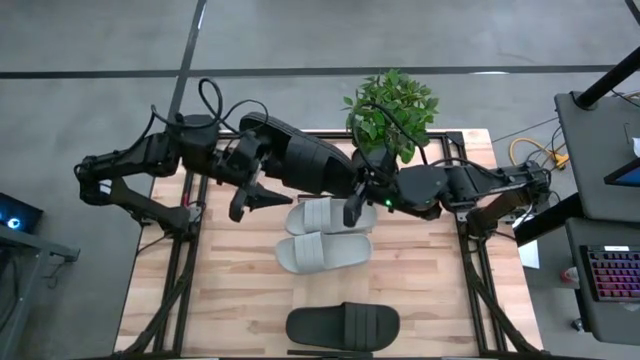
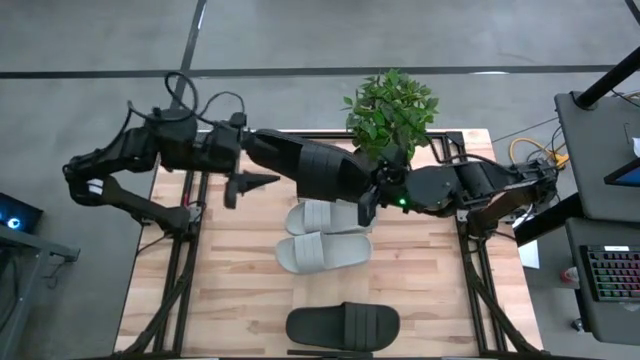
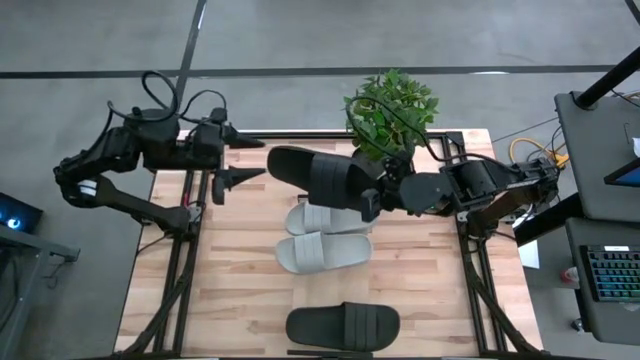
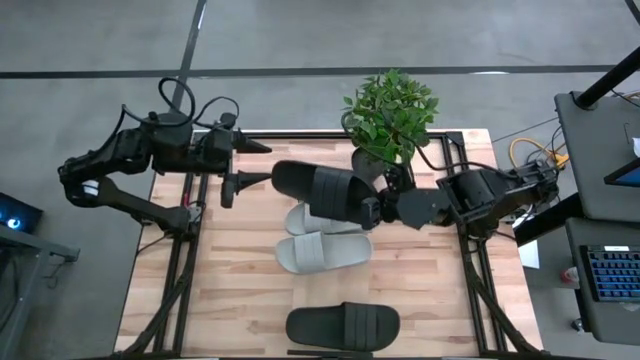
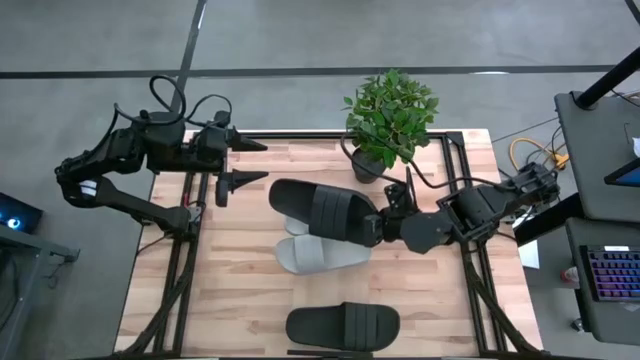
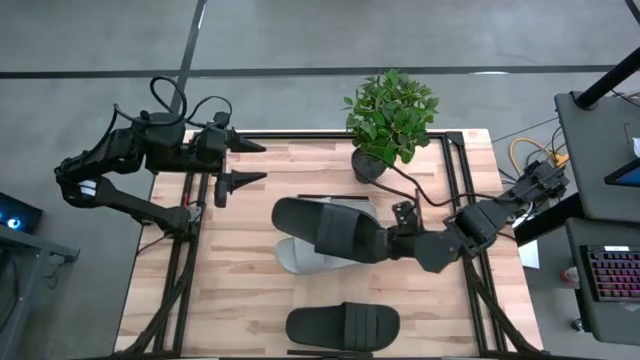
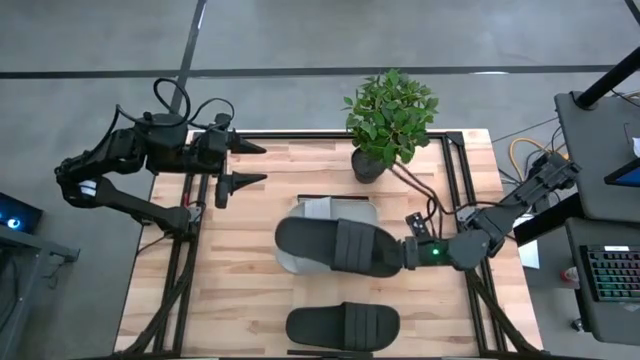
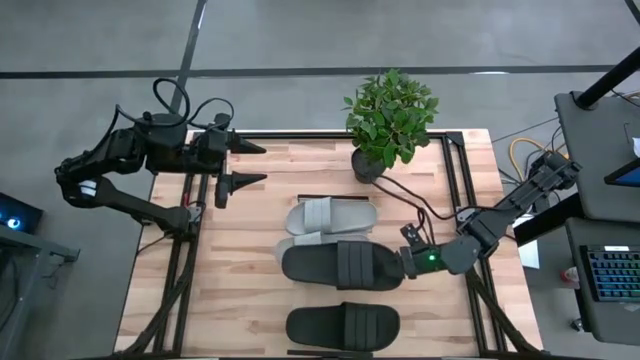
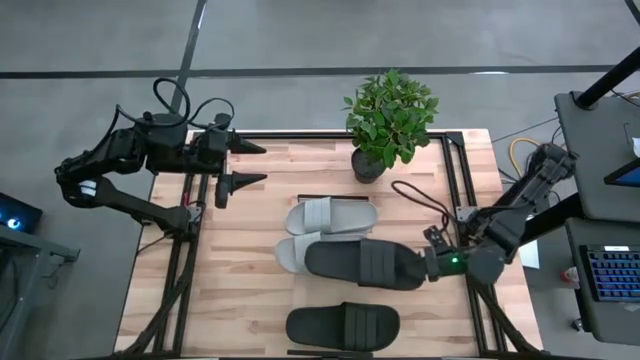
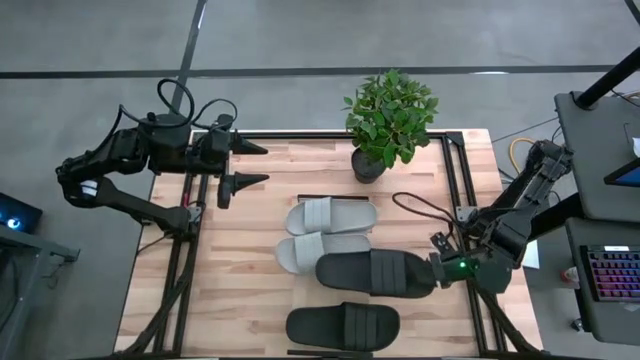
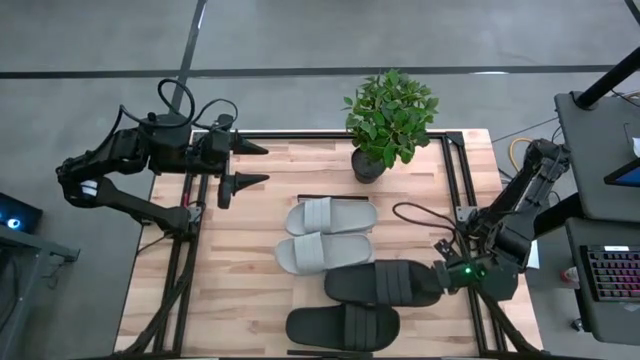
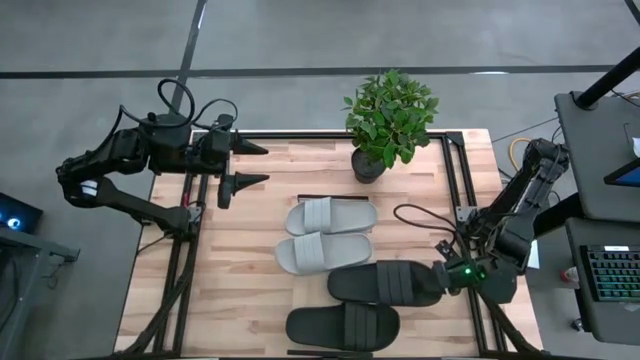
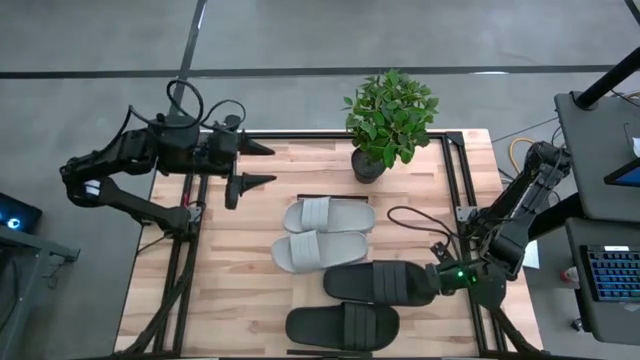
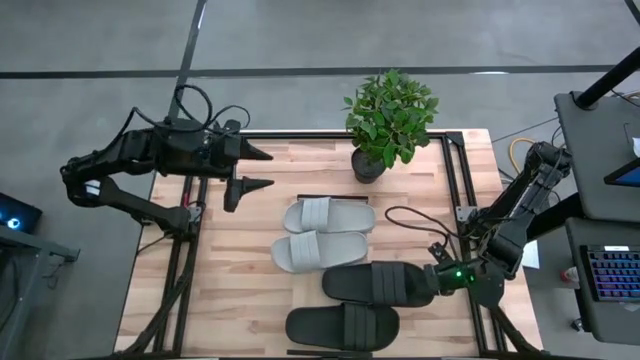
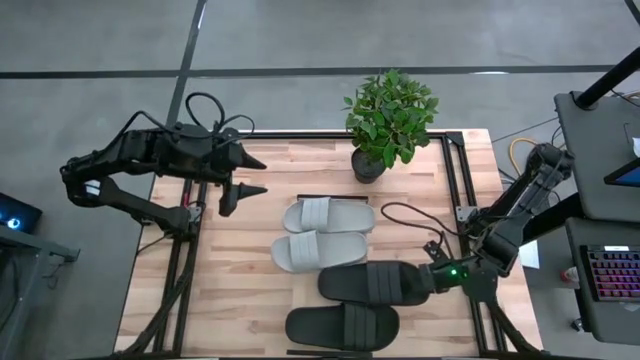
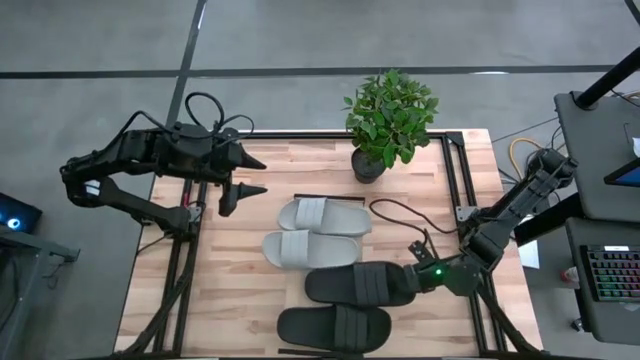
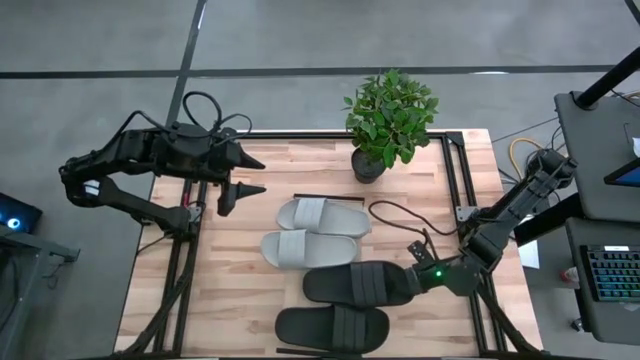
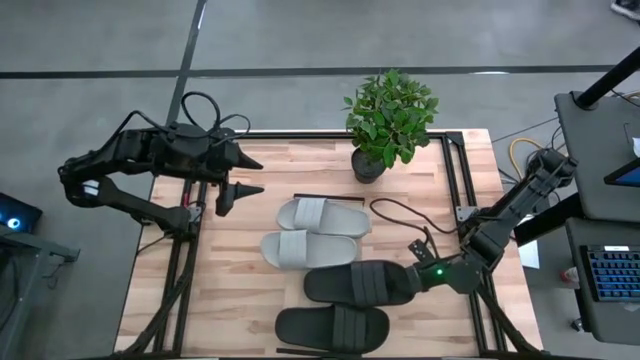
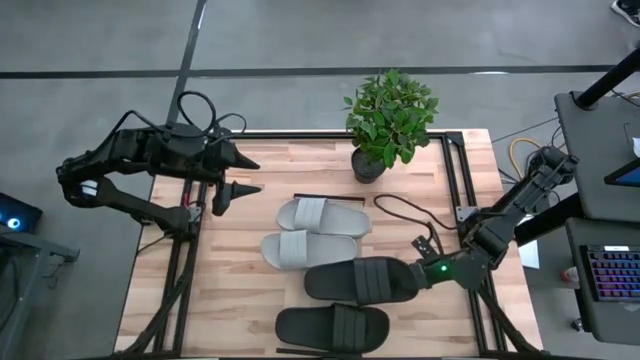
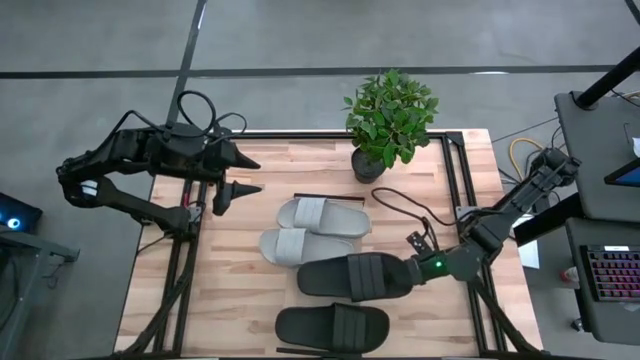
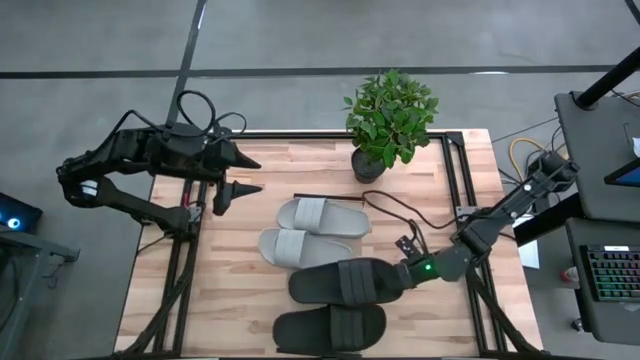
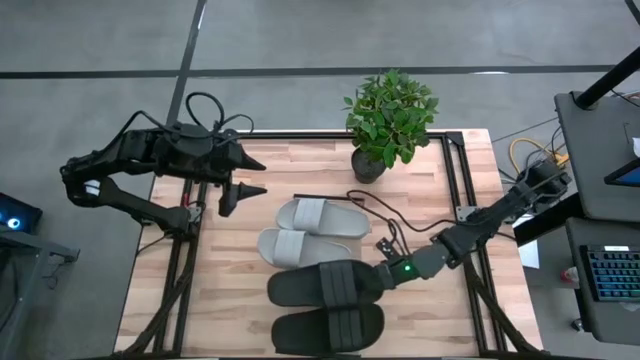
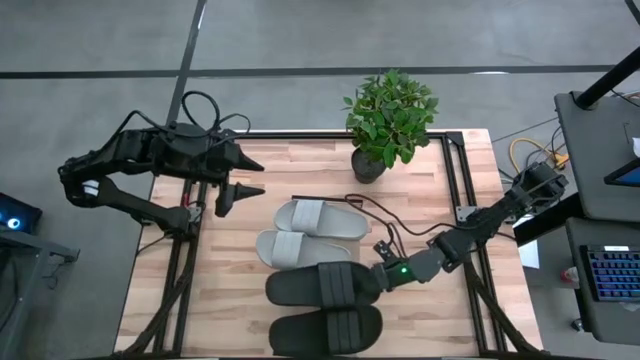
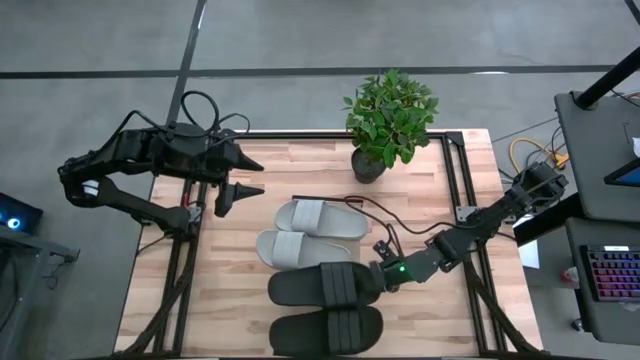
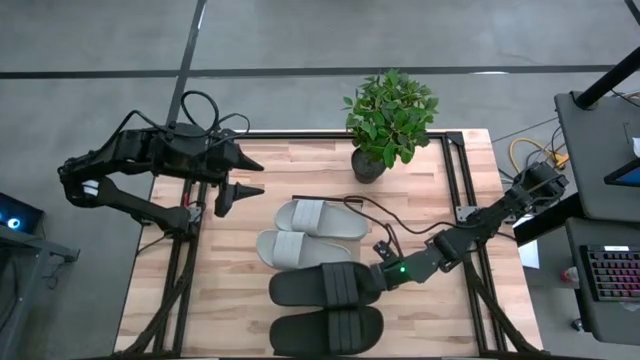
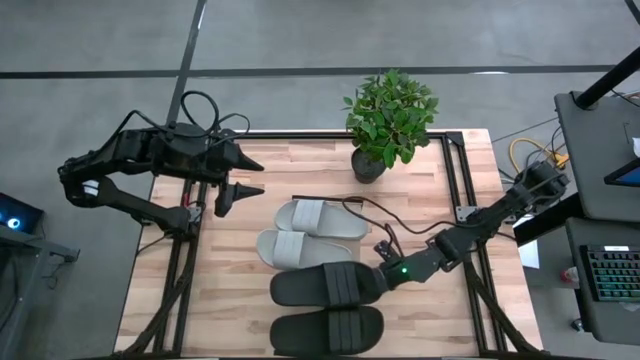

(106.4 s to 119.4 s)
Task: Pick and place slides into the shelf
Put the black slipper on the shelf

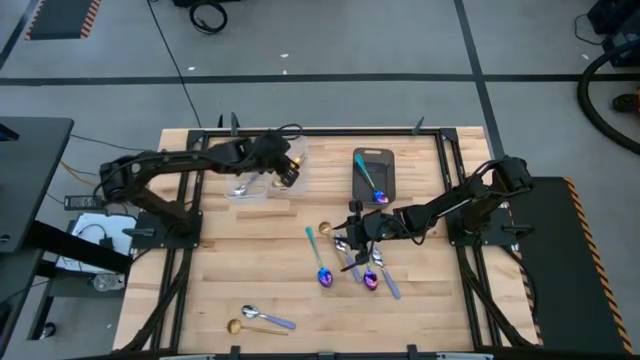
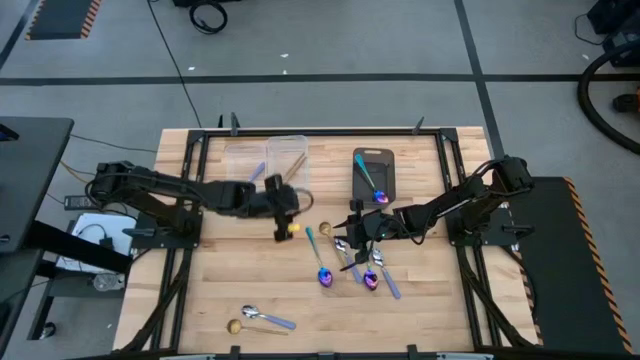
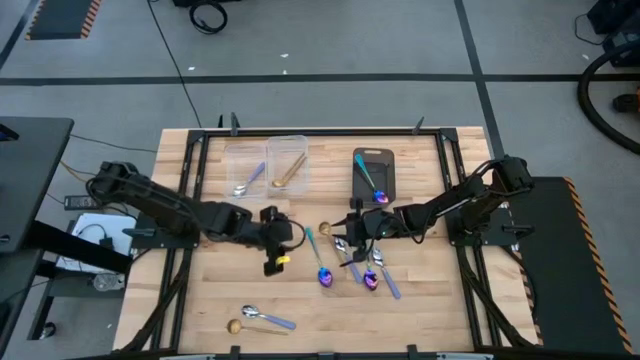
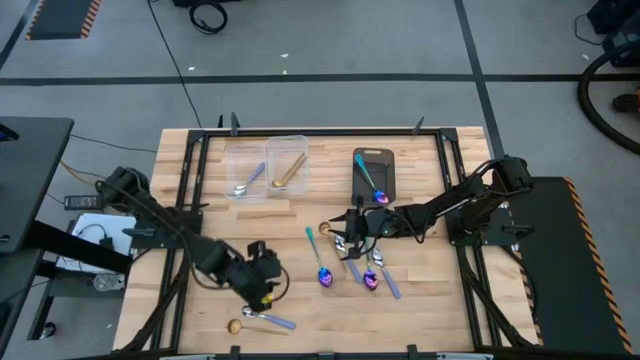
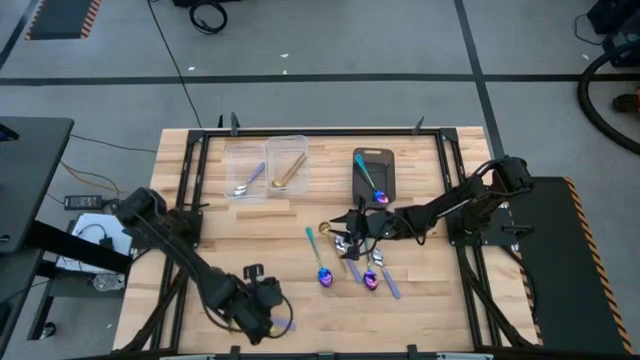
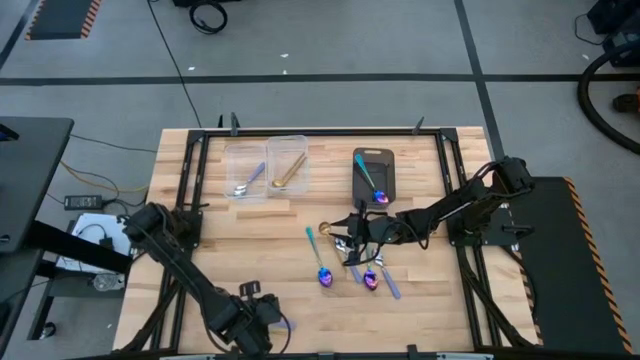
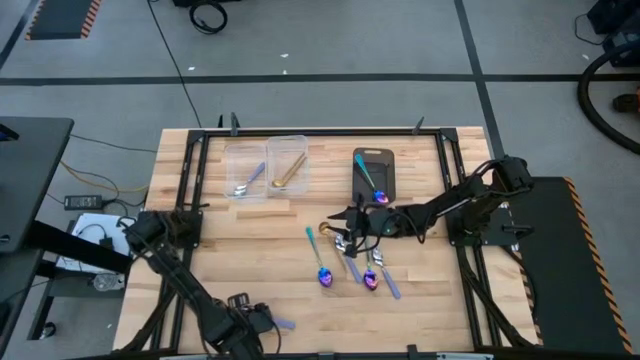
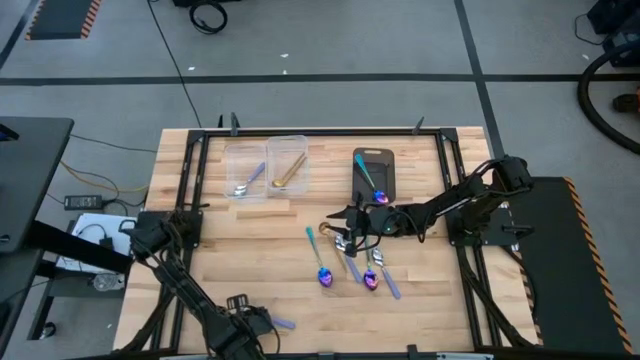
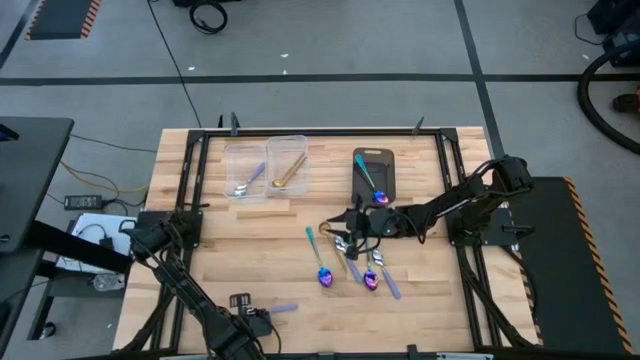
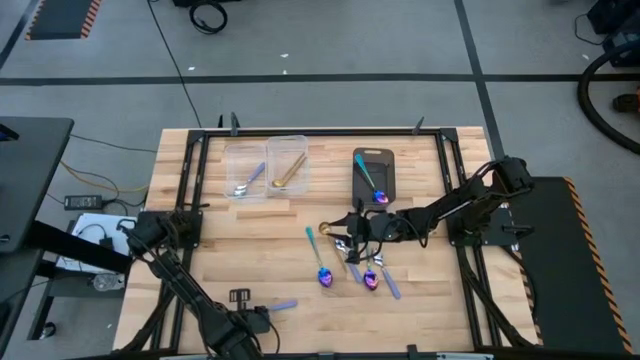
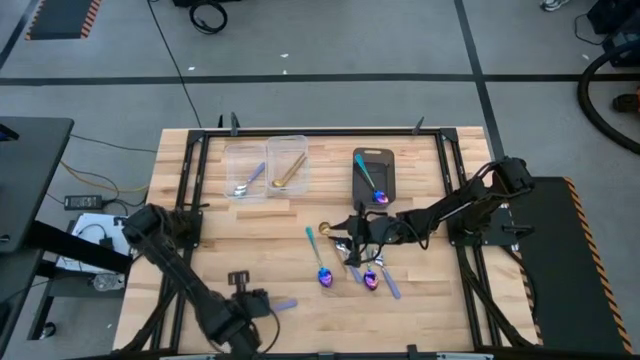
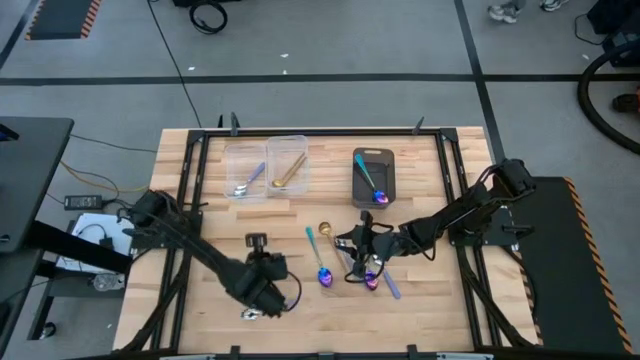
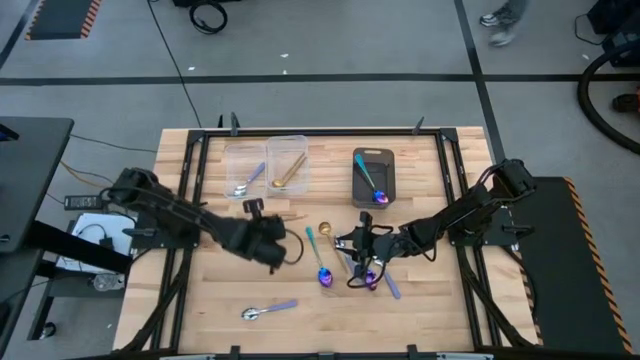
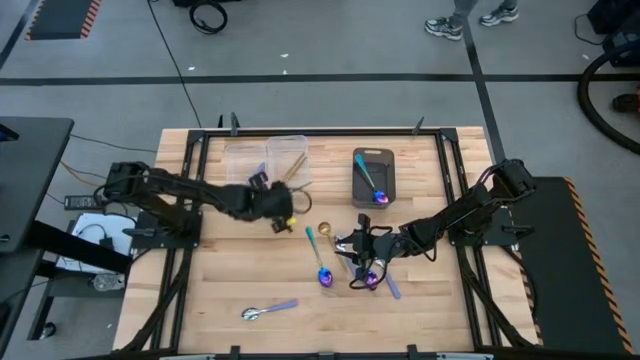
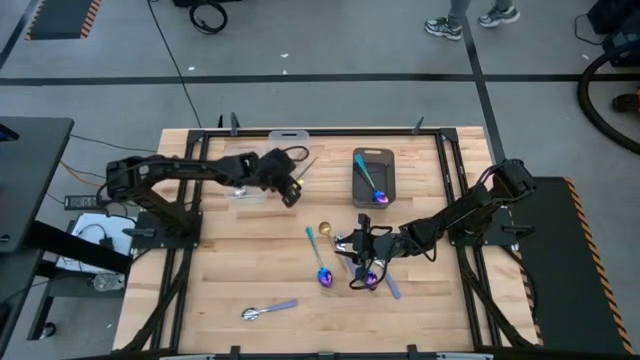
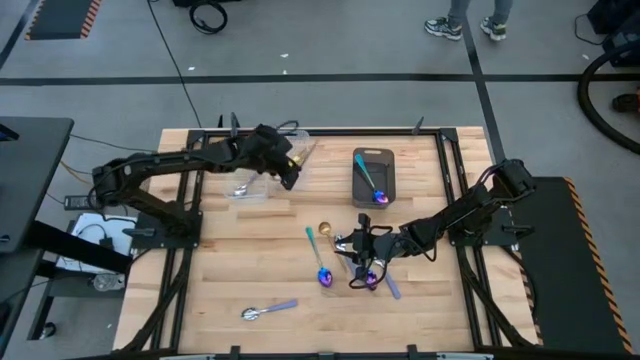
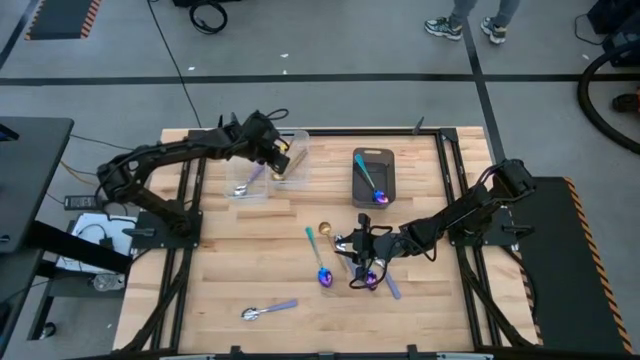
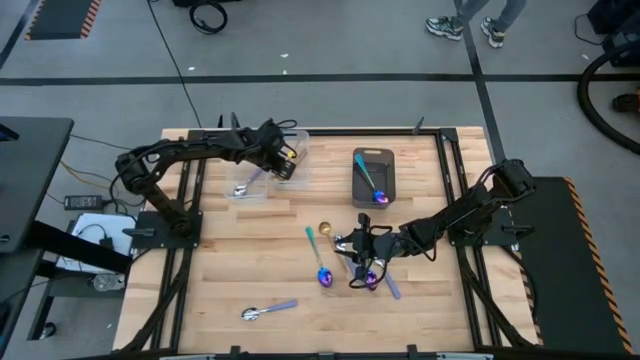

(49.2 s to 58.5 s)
Task: Sort silverware by color (type)
Put the gold spoon into the right transparent bin
